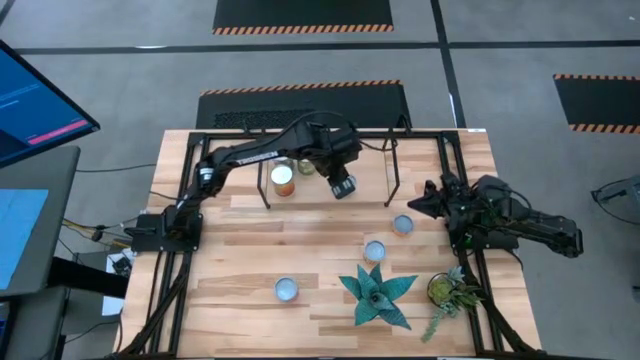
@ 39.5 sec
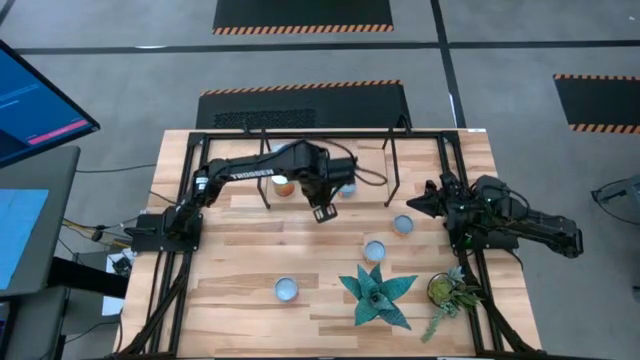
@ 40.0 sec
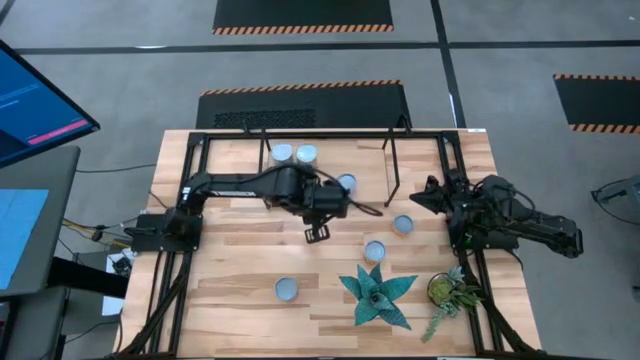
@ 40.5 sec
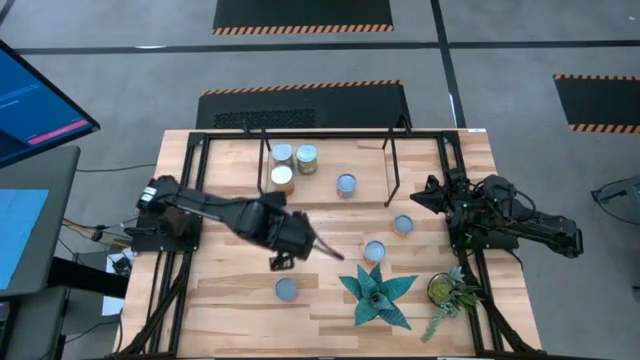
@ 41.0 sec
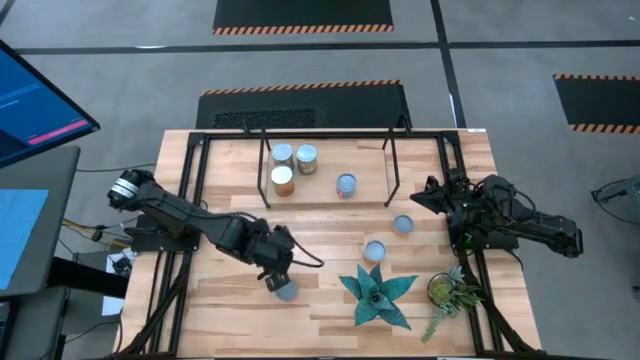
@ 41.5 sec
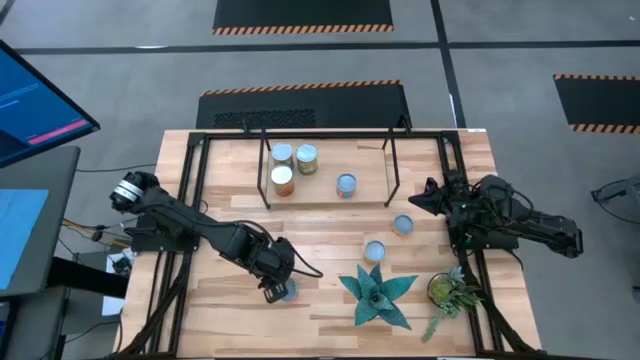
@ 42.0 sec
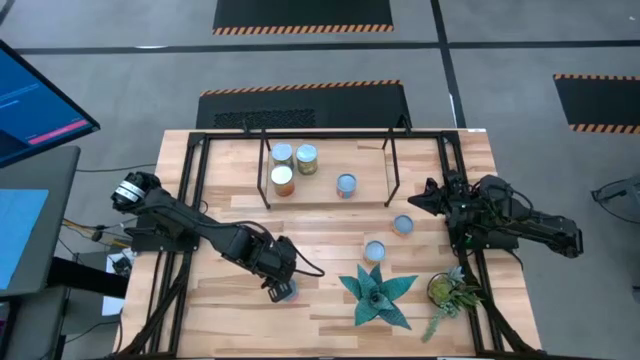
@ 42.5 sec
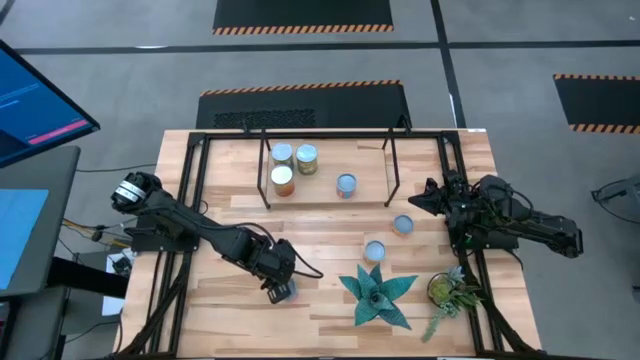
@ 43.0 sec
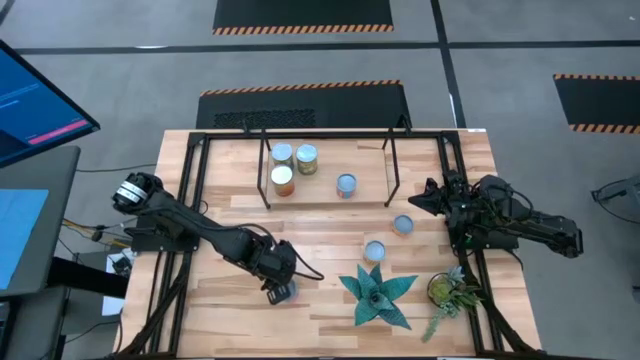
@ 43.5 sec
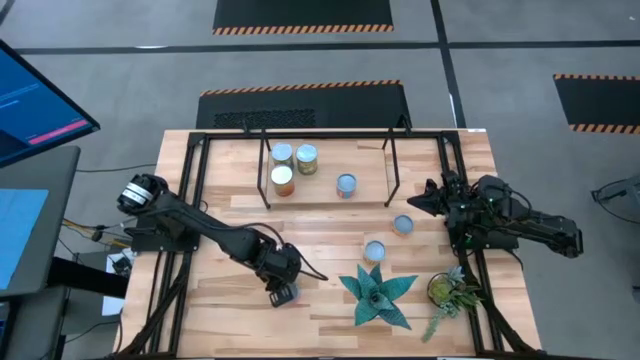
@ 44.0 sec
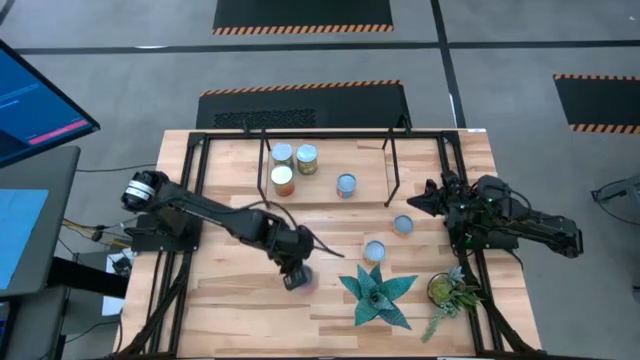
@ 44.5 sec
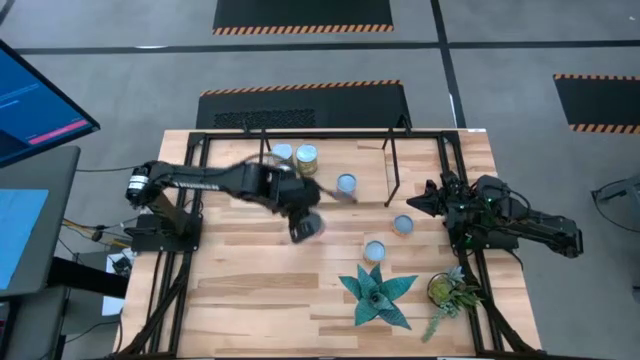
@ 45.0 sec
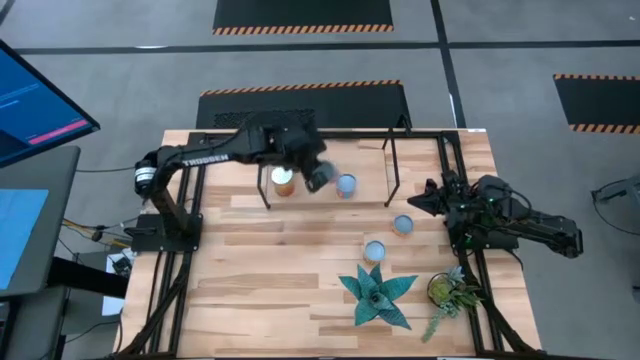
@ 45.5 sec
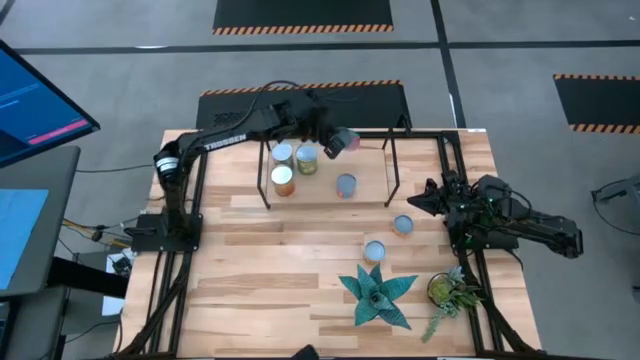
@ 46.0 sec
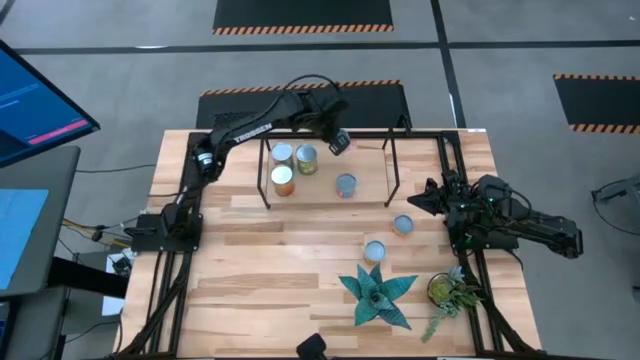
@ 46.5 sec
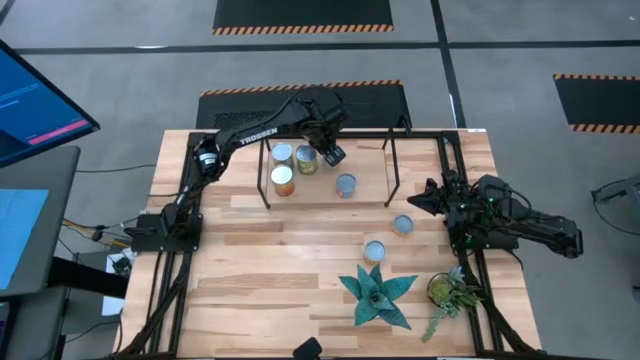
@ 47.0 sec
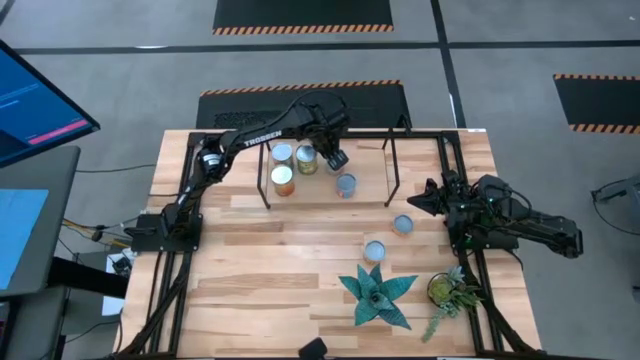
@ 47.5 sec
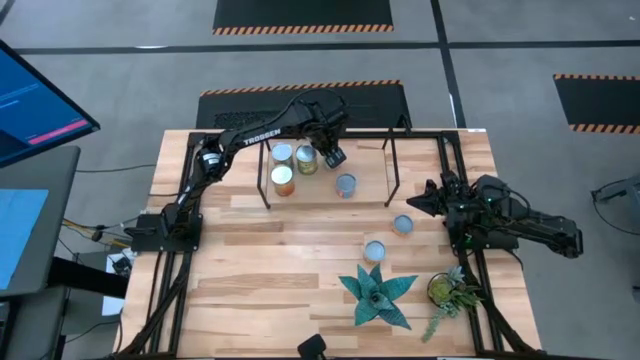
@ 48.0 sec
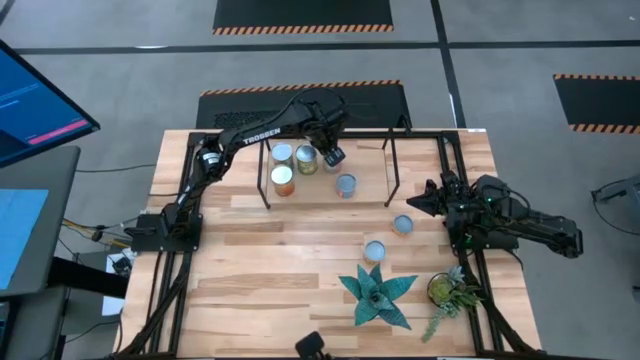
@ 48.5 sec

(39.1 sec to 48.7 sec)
Task: Pick and place cans onto a shelf
Put the canned chicken soup on the shelf

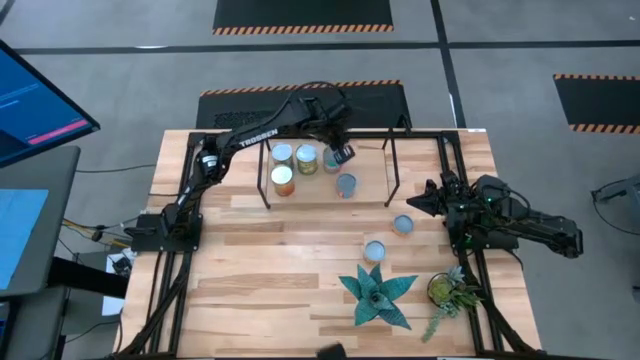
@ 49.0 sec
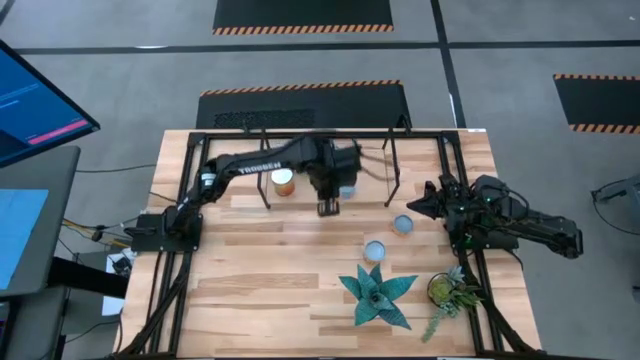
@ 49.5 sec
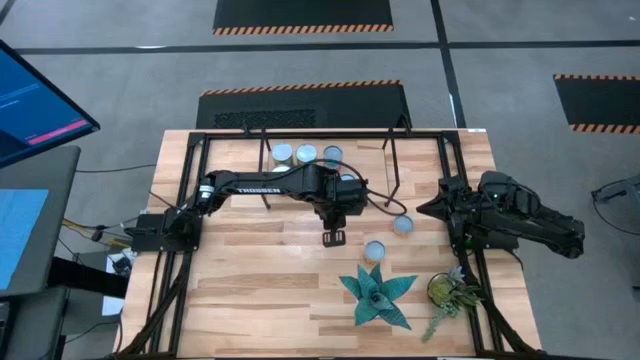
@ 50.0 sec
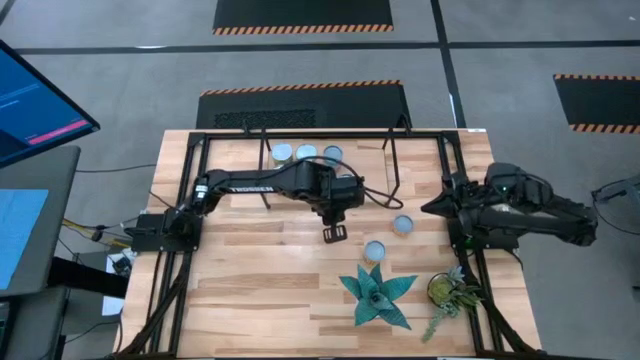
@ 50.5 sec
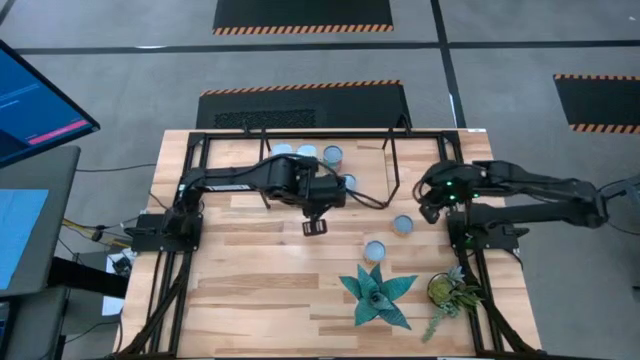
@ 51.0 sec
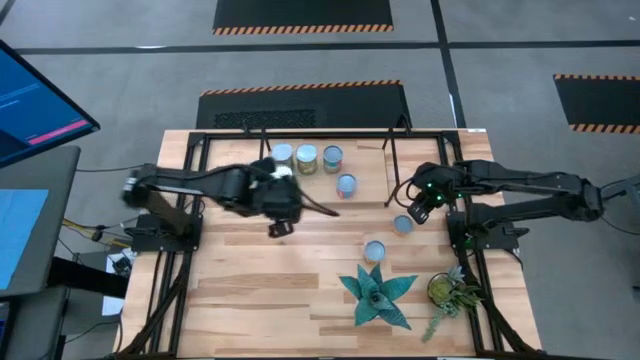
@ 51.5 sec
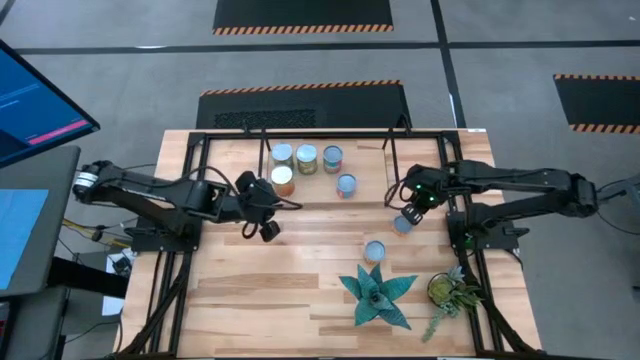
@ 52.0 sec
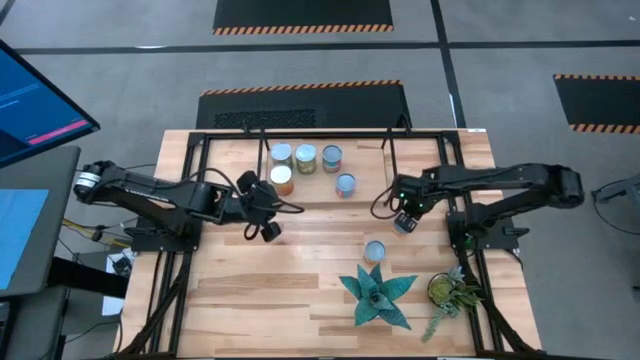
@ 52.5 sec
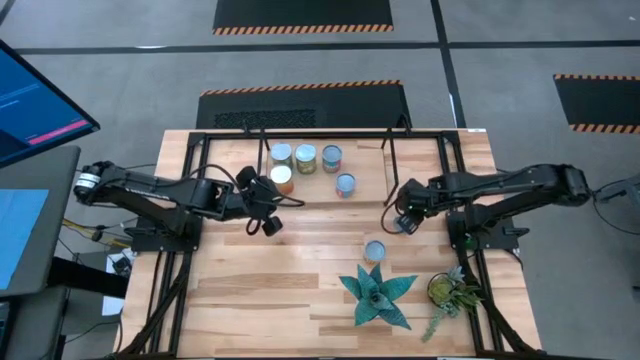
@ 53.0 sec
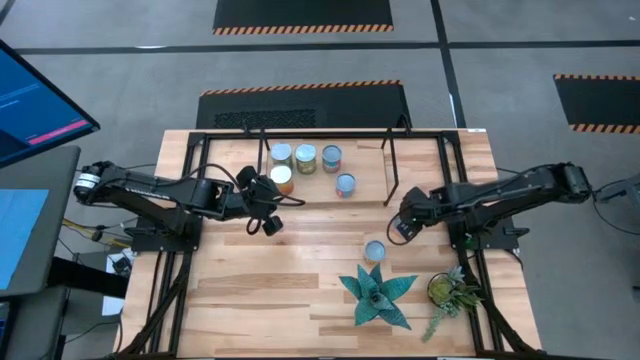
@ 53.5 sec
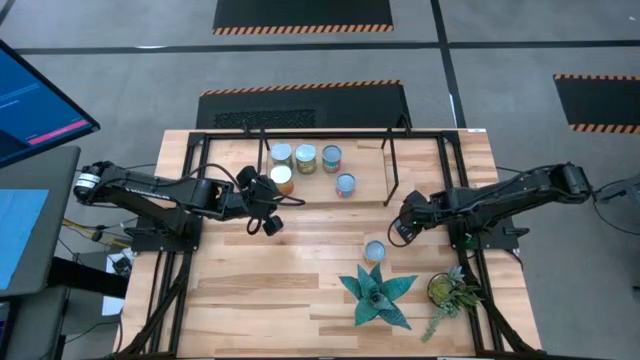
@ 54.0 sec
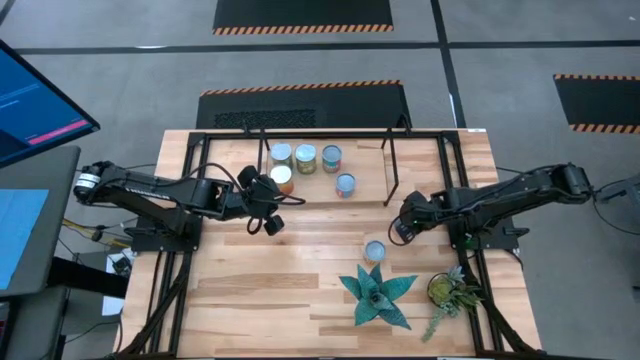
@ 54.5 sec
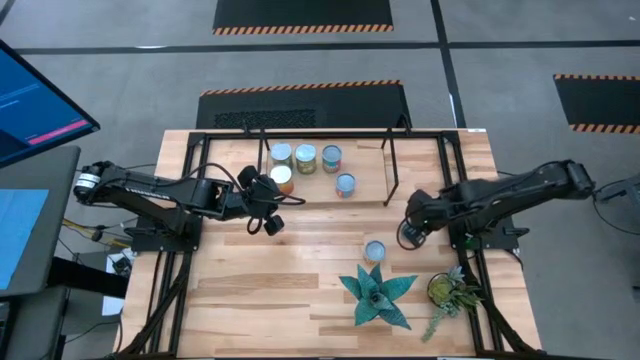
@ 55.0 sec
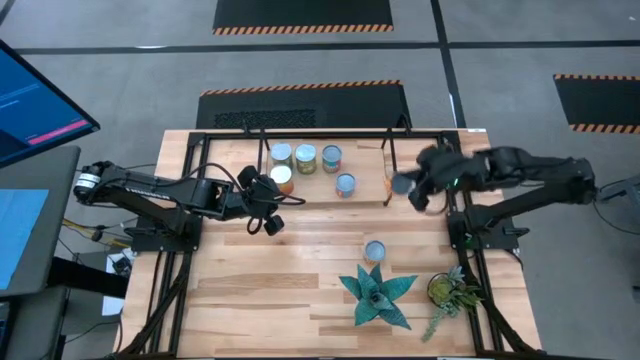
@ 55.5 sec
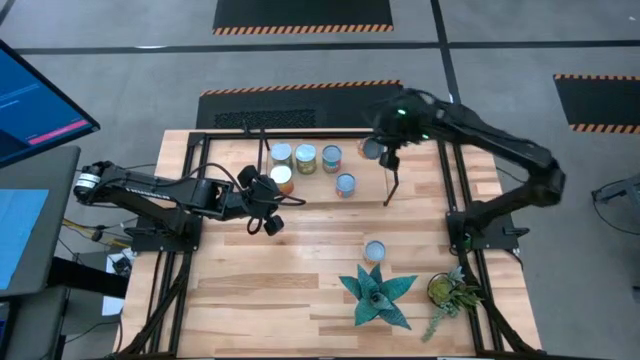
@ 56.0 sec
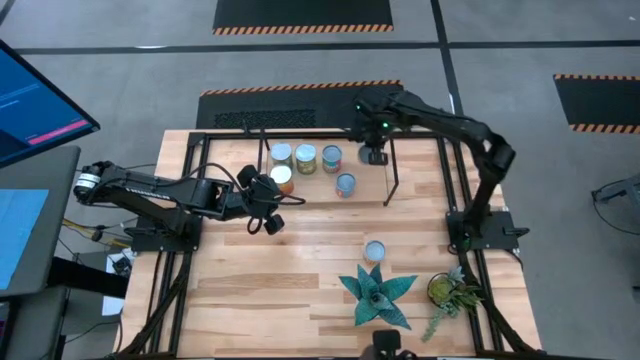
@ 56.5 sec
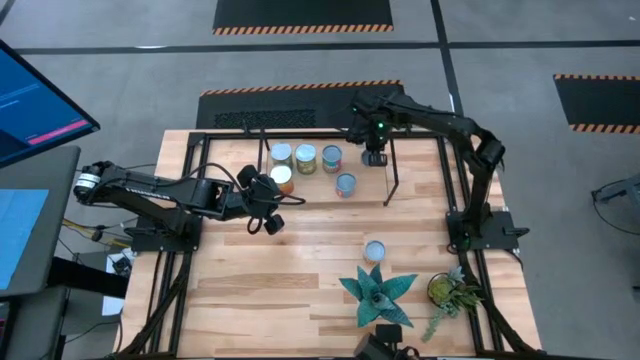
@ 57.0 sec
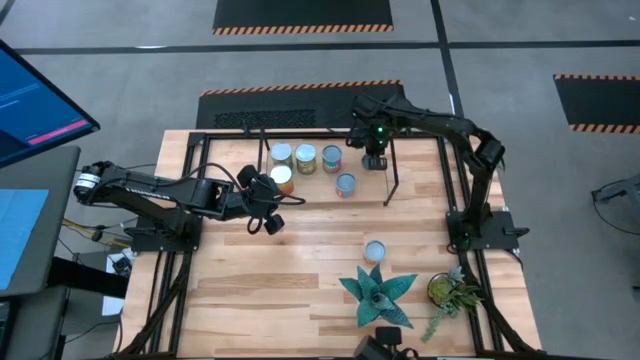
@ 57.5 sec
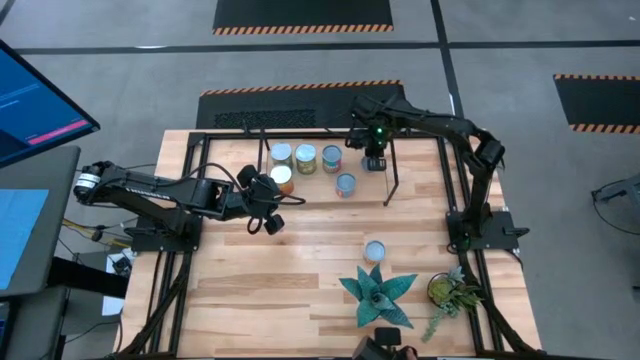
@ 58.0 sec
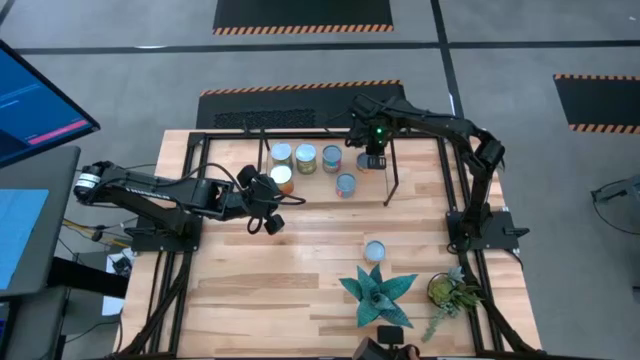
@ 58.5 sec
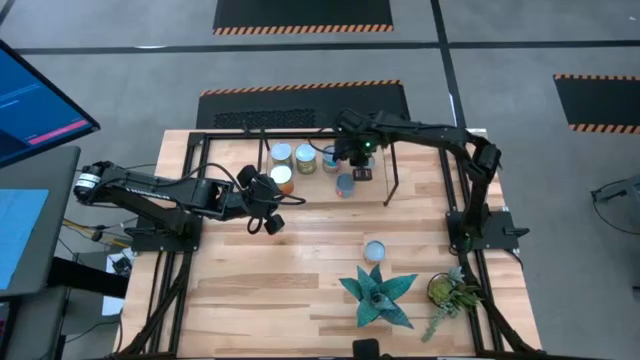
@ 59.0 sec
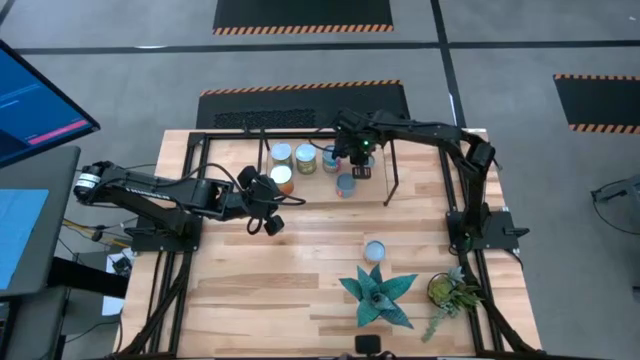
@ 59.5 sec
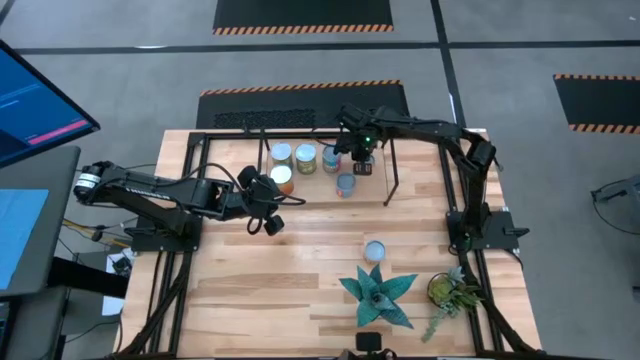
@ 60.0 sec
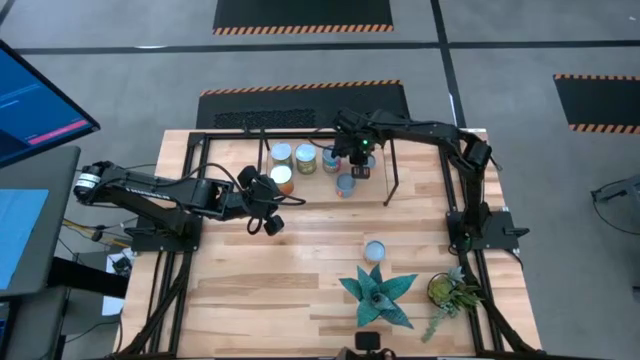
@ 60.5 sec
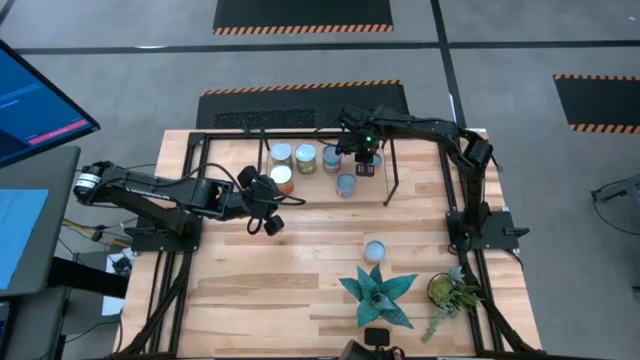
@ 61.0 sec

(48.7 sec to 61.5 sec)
Put the canned pineapple rings on the shelf
